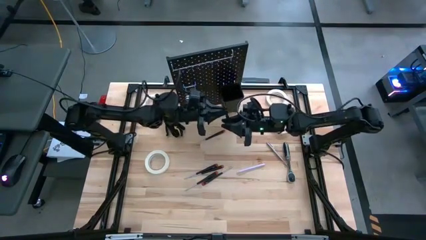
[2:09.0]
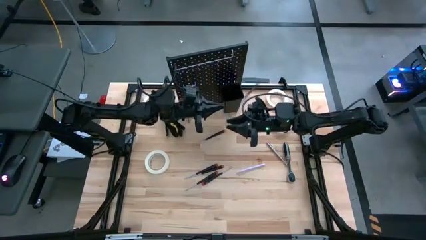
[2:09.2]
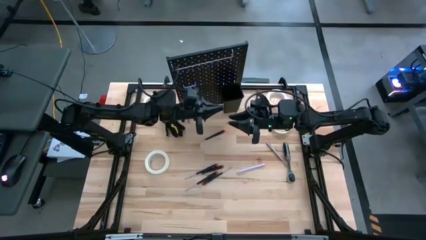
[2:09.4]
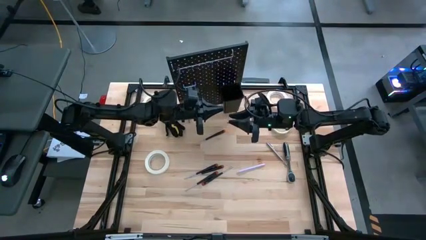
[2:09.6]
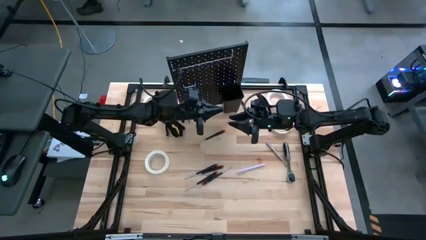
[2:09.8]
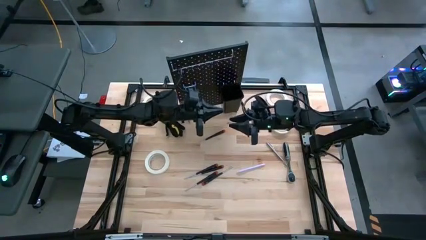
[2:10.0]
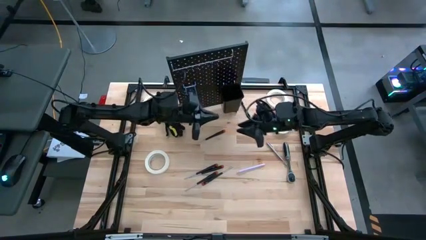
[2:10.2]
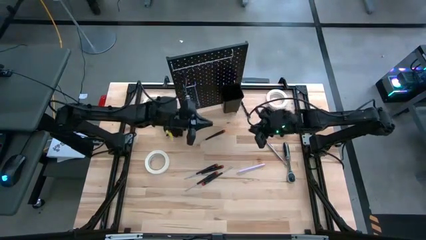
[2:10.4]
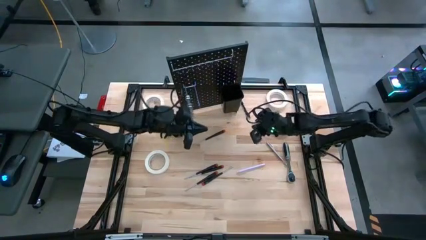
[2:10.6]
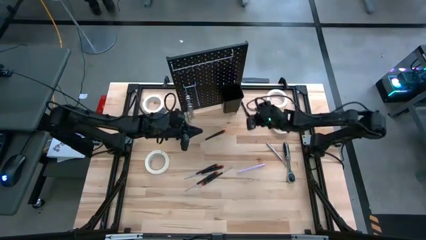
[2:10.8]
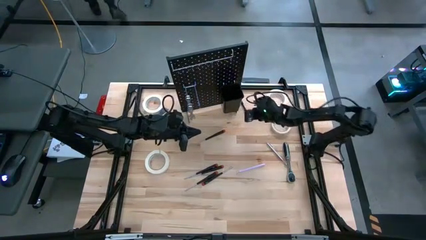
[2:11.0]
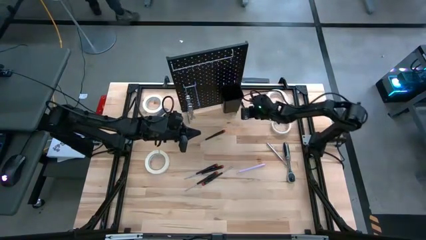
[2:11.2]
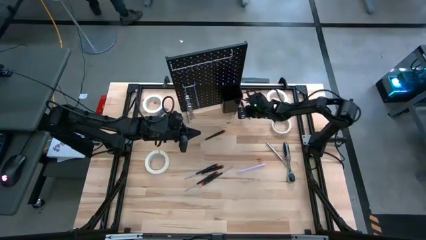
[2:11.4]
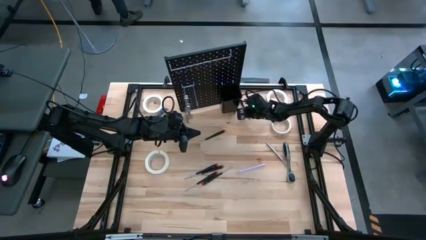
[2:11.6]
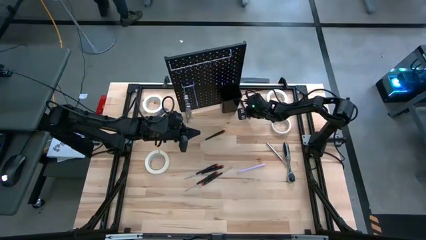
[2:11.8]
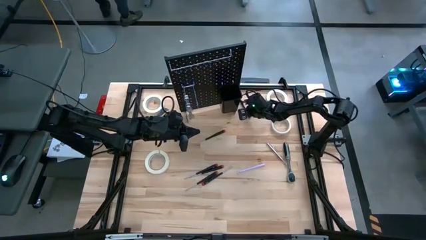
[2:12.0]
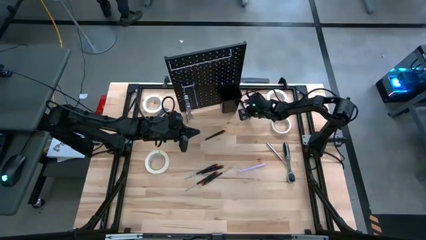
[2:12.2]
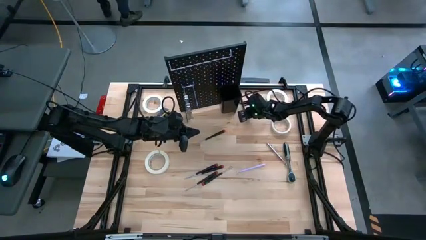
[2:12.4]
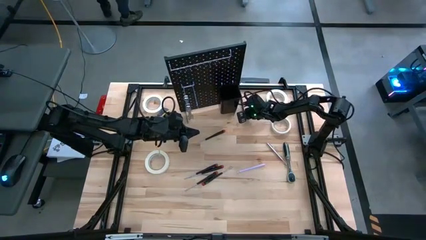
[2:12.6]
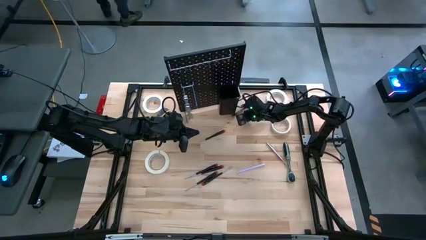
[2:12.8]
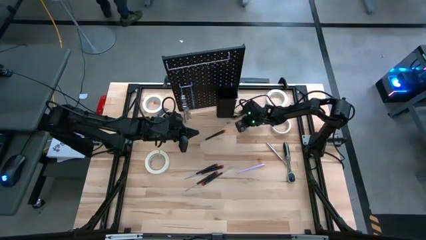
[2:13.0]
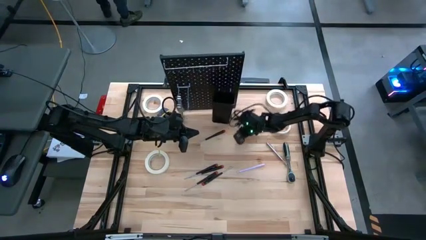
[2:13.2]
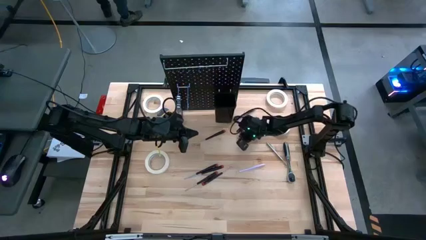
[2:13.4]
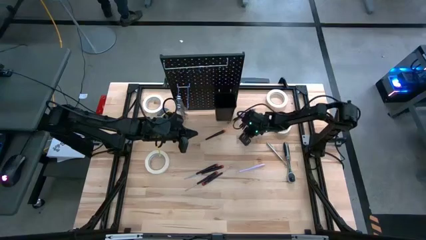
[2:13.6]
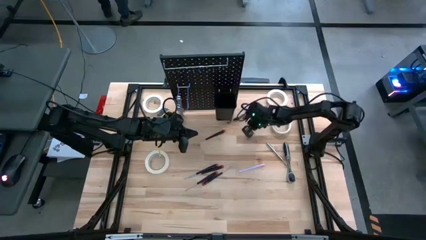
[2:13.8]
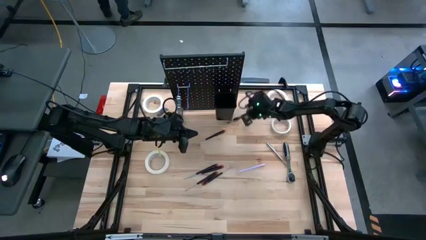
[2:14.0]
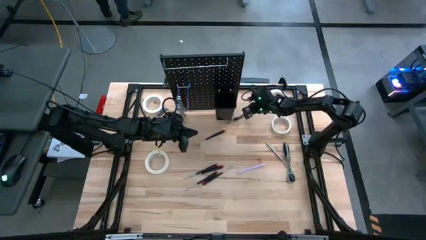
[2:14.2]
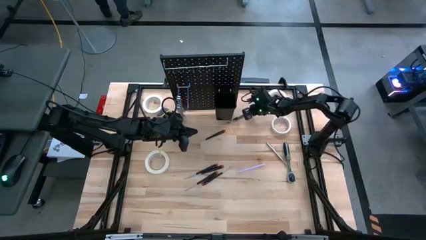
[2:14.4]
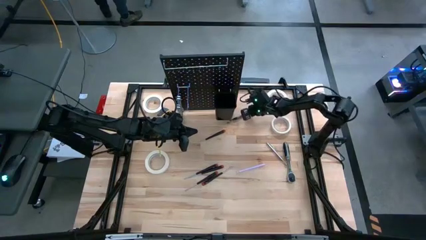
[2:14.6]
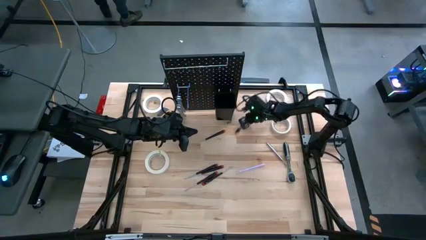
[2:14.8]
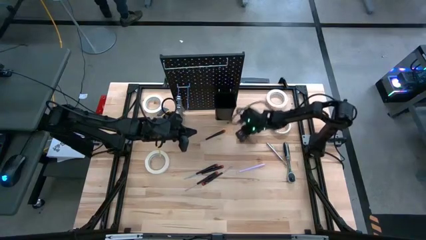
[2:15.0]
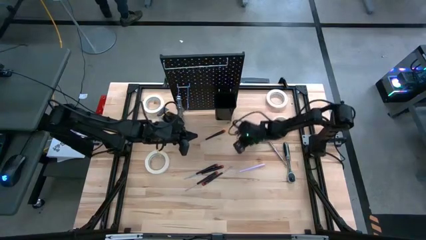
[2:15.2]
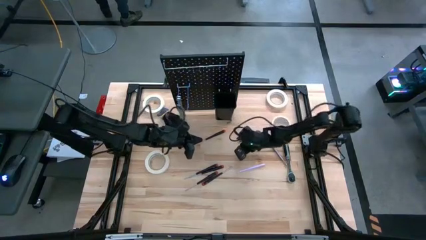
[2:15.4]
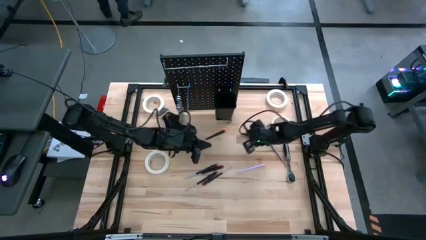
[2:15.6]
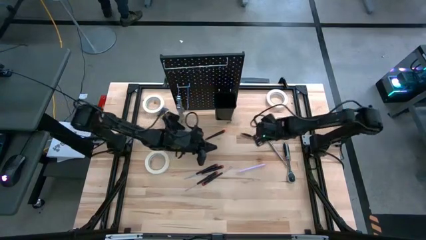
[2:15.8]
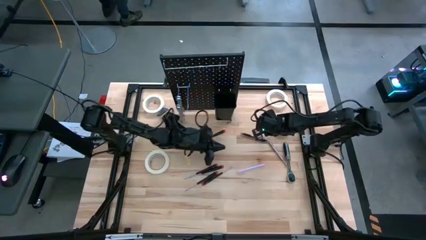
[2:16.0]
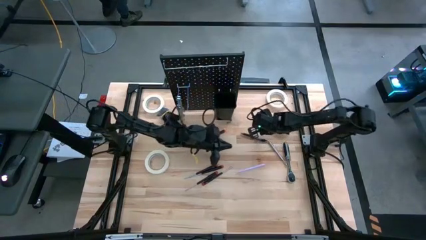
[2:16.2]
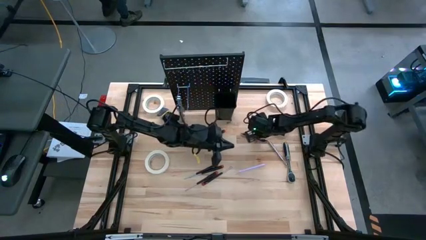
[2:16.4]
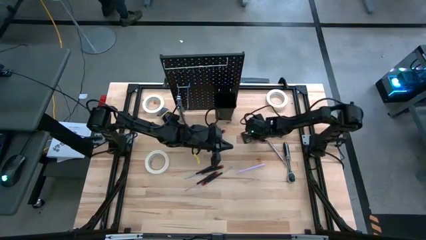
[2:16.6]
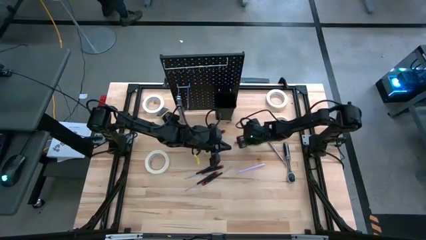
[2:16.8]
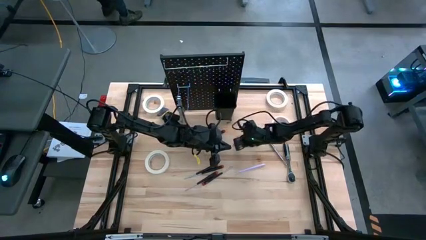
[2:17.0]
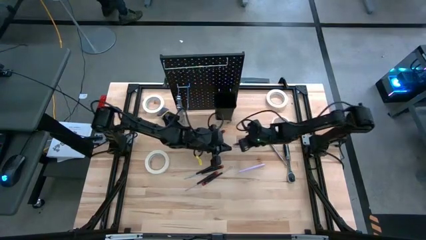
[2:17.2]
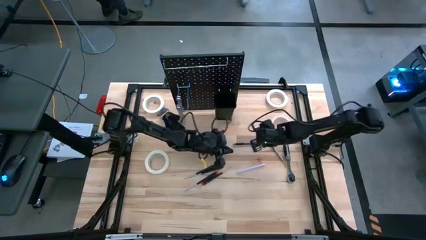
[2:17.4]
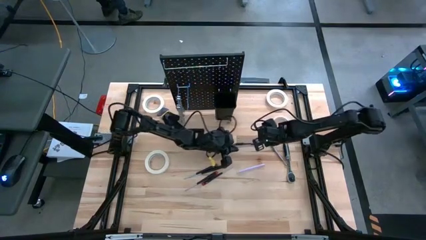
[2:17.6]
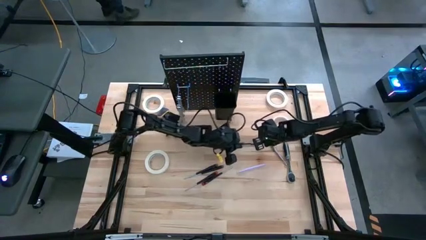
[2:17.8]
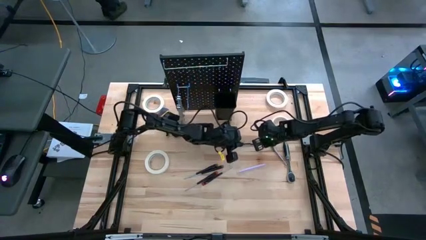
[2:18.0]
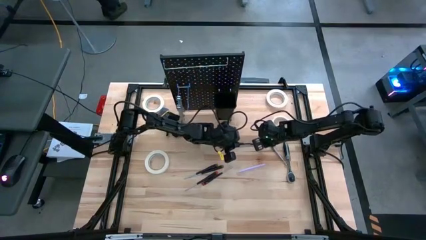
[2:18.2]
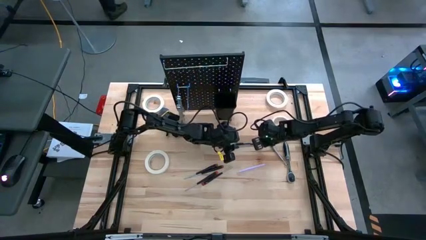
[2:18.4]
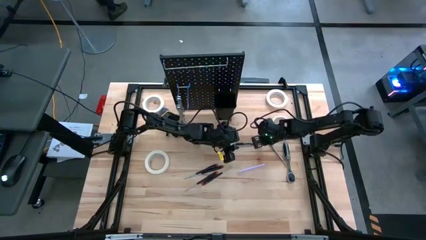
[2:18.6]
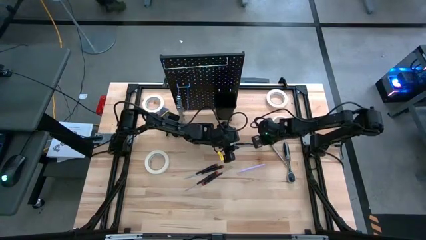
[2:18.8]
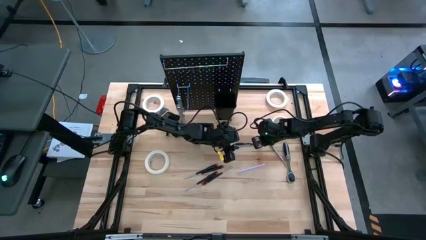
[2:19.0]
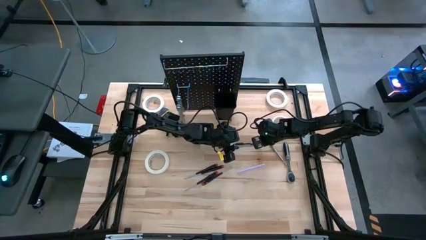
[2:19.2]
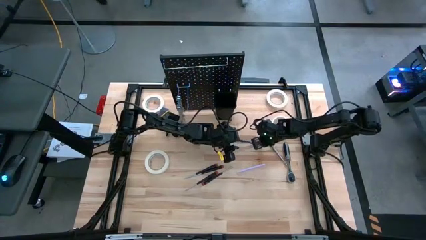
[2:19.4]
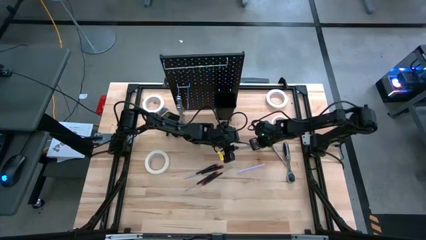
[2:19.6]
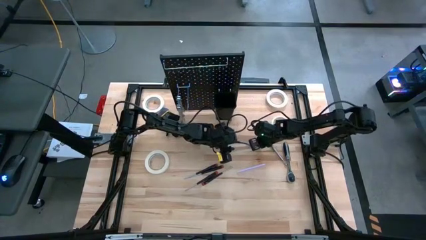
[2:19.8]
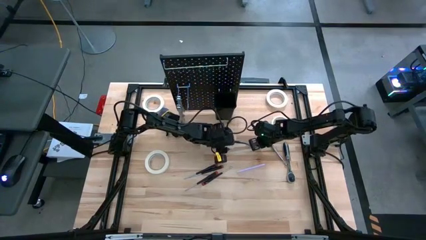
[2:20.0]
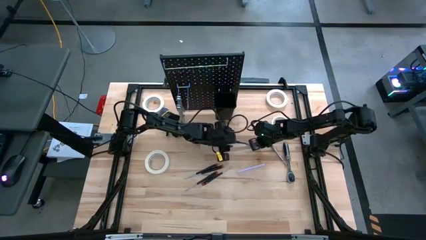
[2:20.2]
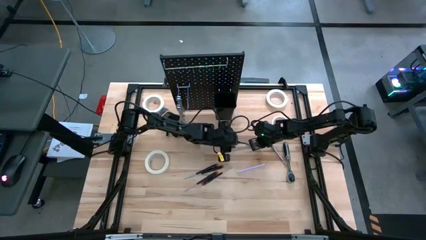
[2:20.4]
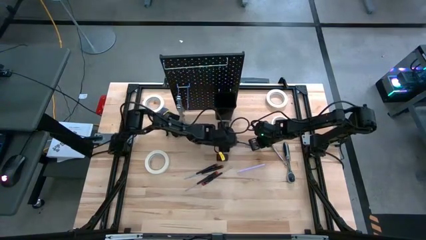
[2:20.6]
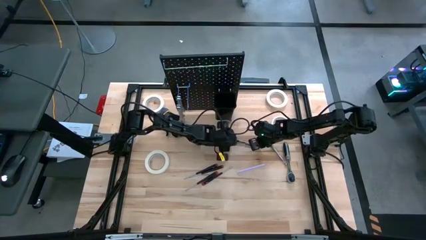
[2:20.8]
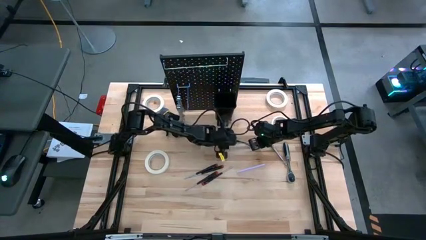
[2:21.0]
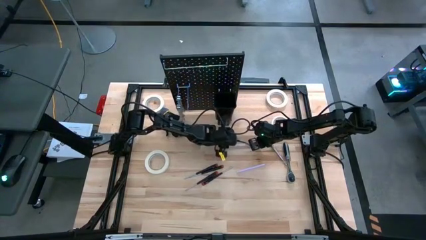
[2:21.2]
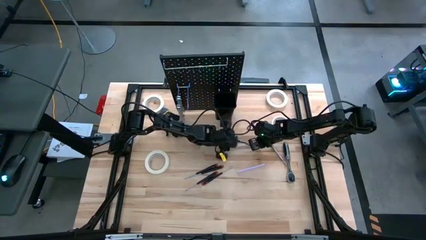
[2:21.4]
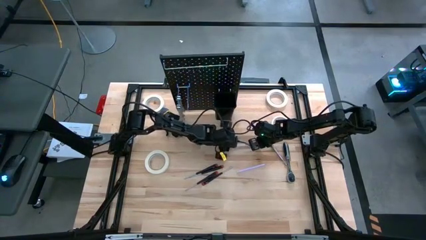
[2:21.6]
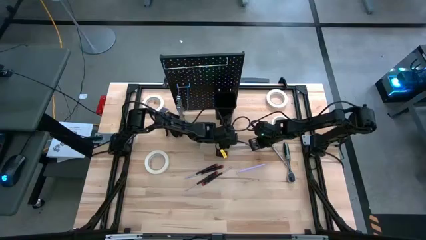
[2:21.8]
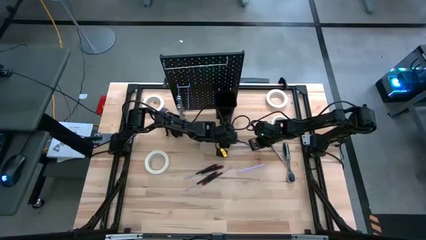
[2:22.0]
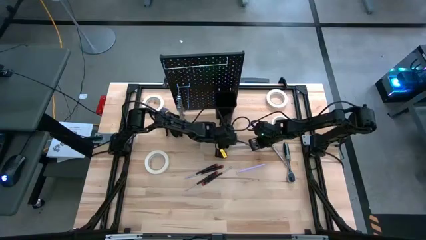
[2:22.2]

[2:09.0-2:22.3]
Task: Hang tools onto peg board
Put the black pen into the black bin on the peg board

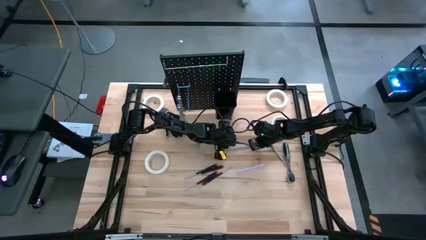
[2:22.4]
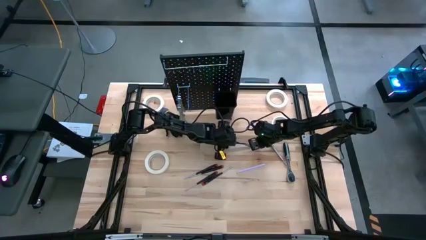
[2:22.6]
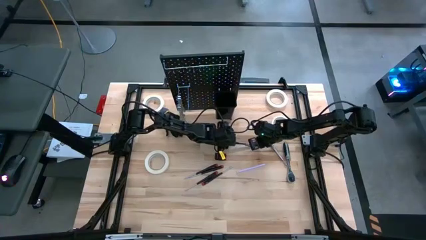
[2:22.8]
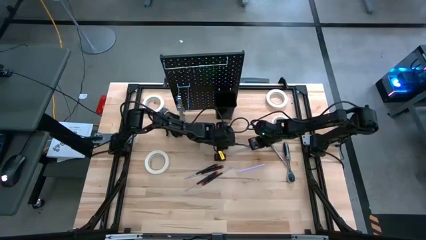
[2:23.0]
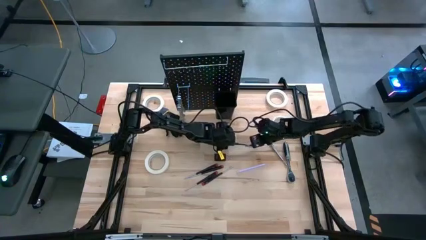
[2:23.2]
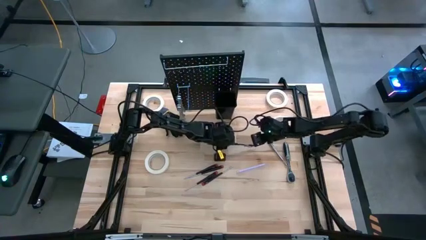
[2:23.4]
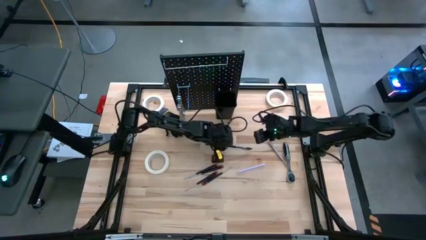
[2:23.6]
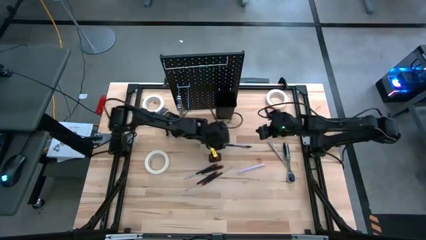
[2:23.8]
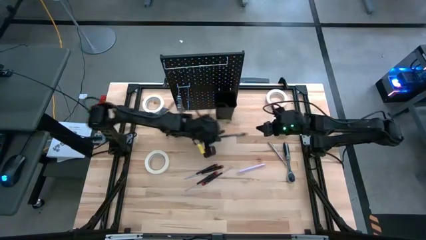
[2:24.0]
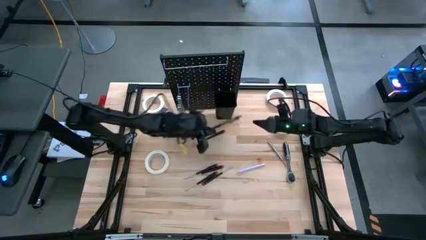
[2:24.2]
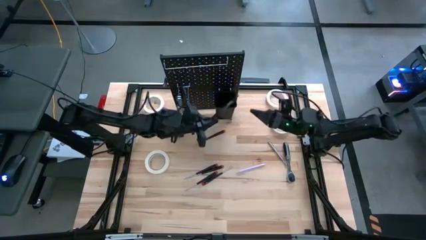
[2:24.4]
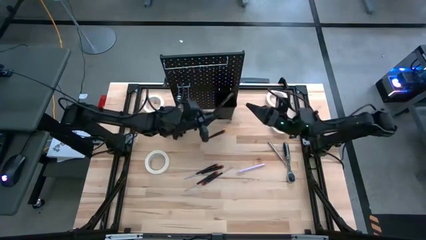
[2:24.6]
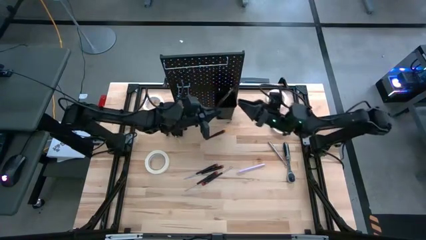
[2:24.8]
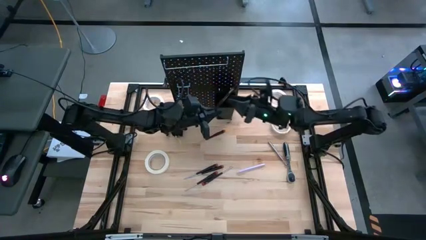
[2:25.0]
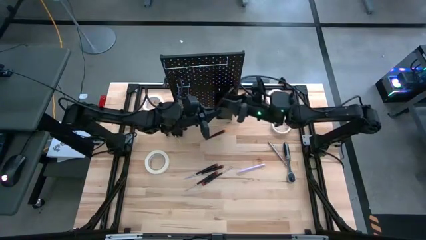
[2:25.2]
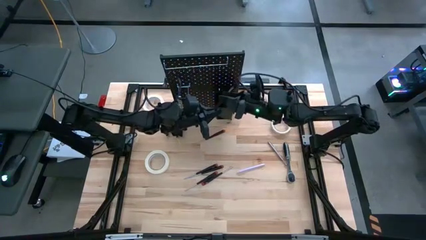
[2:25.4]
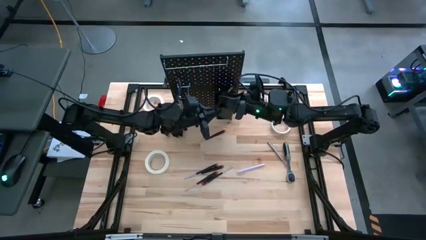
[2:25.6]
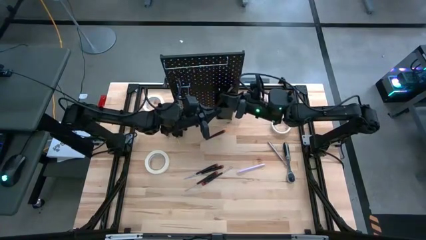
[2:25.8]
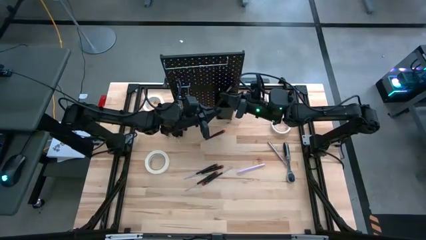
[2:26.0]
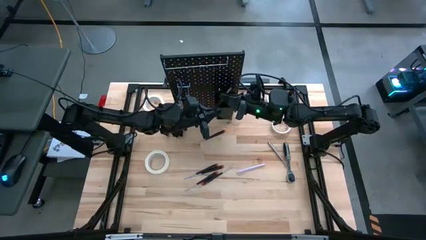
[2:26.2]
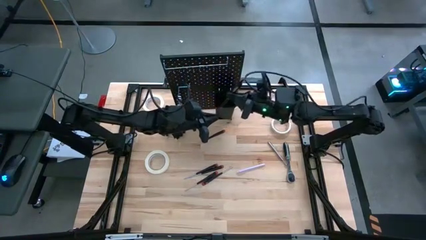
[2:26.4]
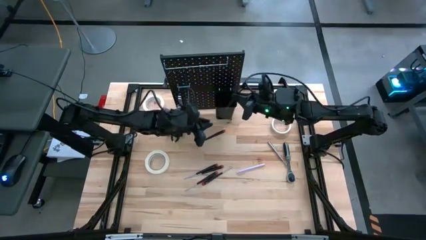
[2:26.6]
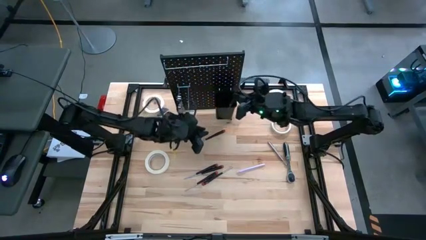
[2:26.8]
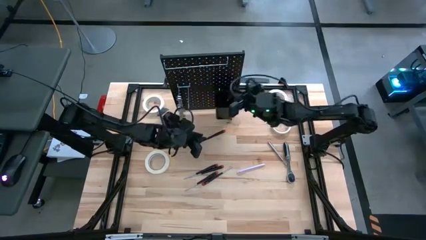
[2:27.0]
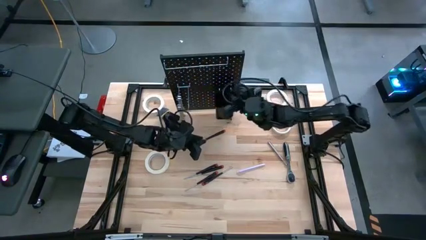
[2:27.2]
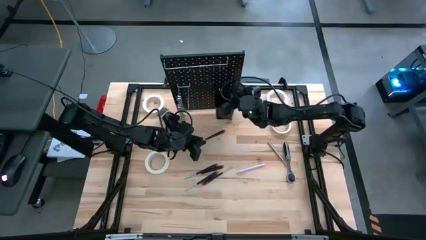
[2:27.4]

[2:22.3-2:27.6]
Put the black pen into the black bin on the peg board
